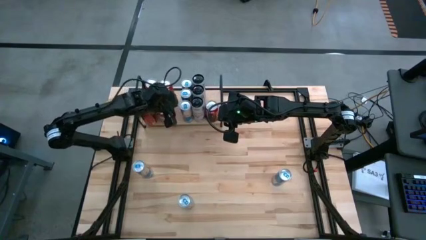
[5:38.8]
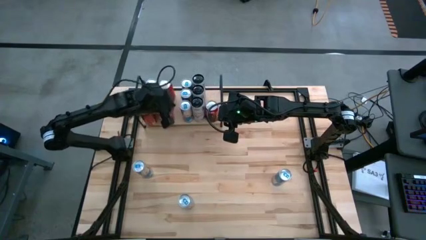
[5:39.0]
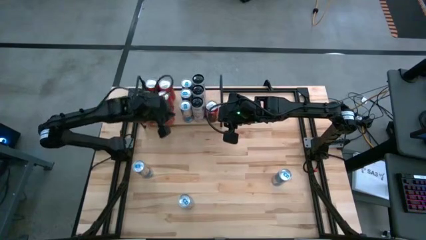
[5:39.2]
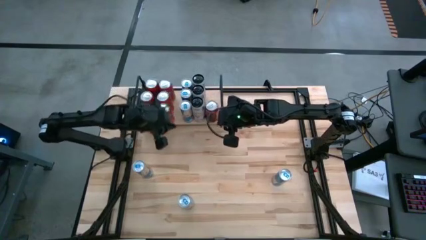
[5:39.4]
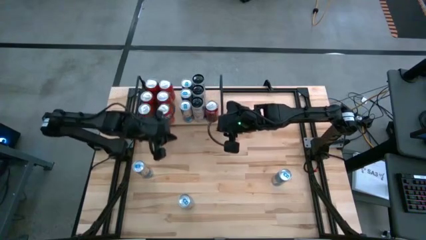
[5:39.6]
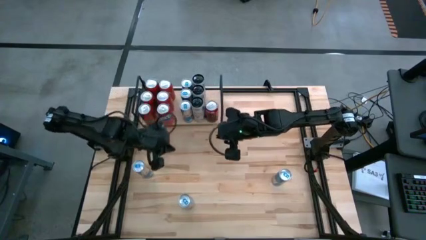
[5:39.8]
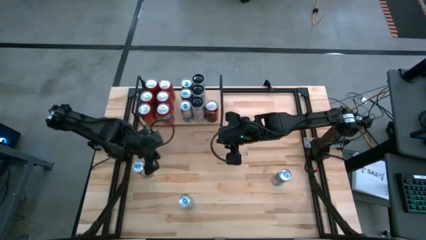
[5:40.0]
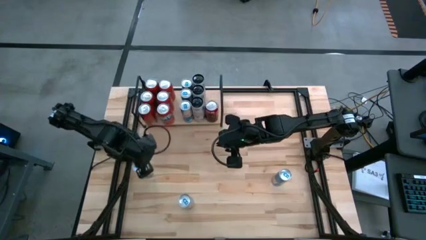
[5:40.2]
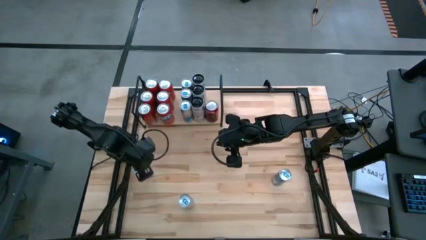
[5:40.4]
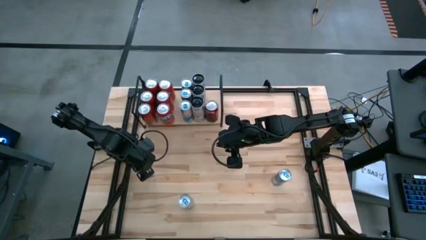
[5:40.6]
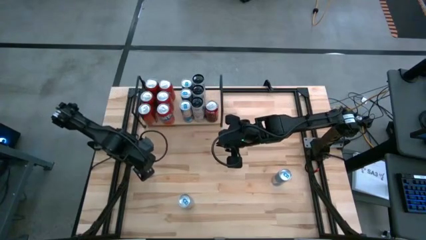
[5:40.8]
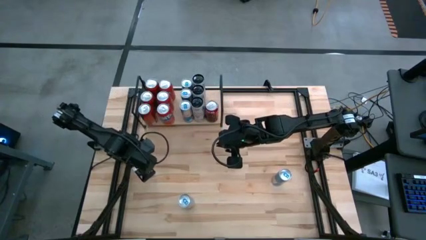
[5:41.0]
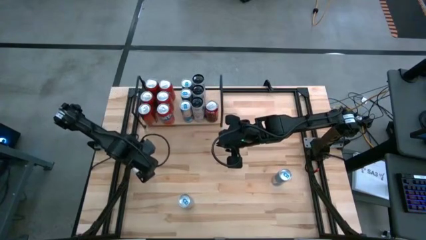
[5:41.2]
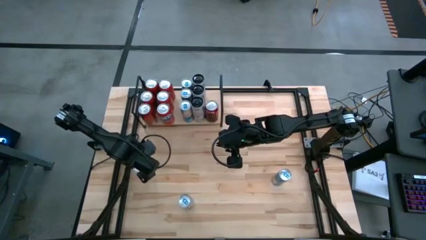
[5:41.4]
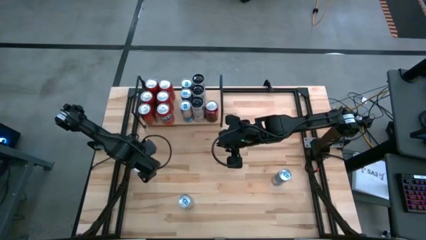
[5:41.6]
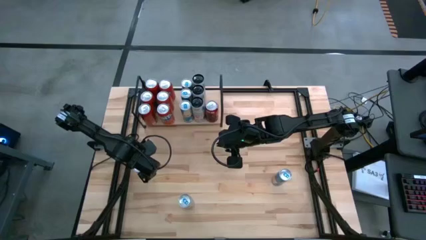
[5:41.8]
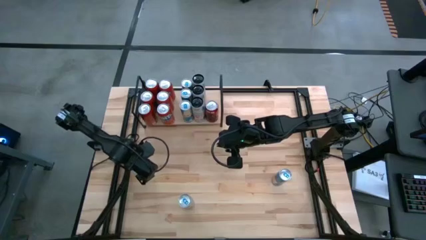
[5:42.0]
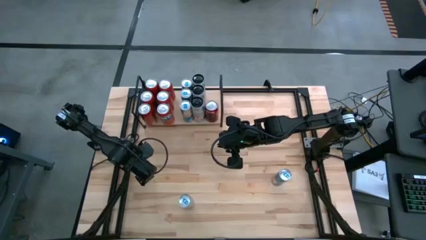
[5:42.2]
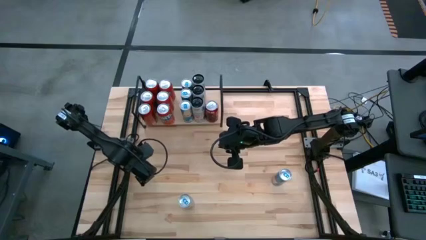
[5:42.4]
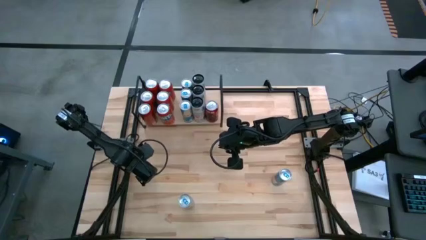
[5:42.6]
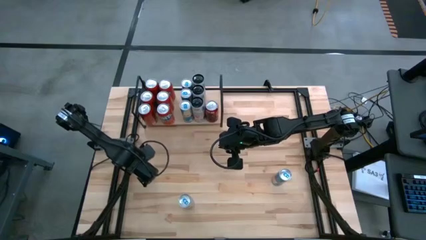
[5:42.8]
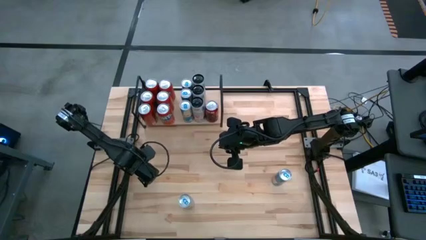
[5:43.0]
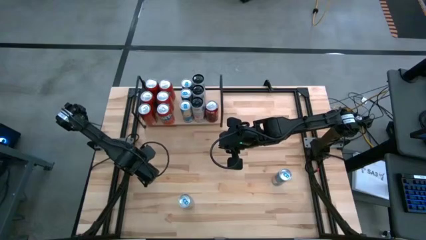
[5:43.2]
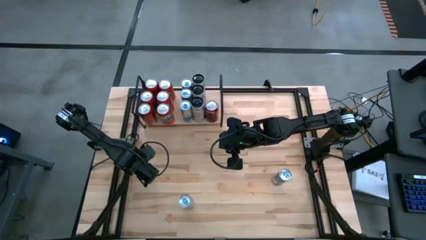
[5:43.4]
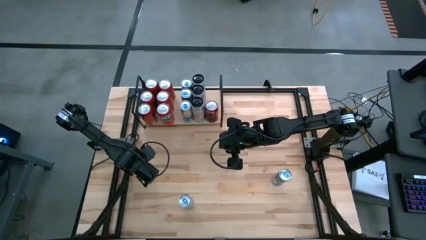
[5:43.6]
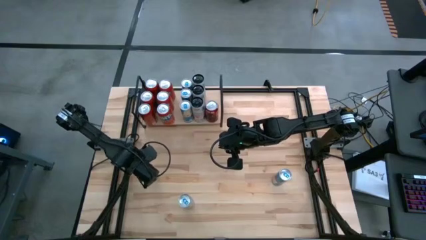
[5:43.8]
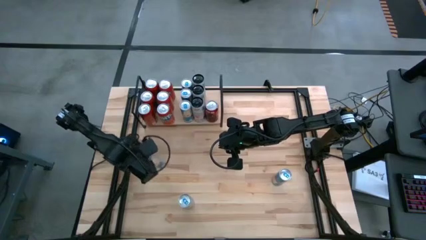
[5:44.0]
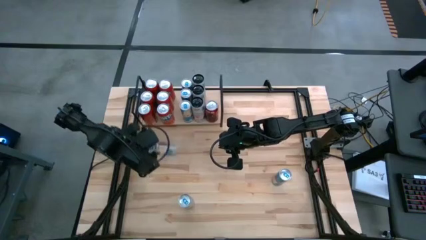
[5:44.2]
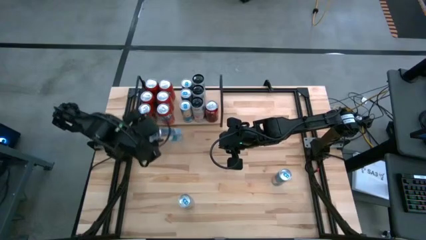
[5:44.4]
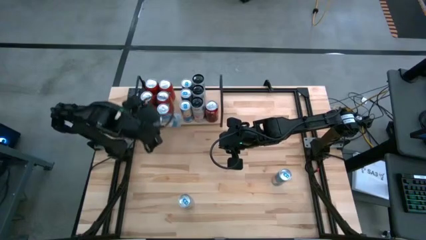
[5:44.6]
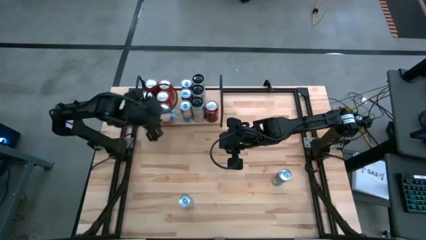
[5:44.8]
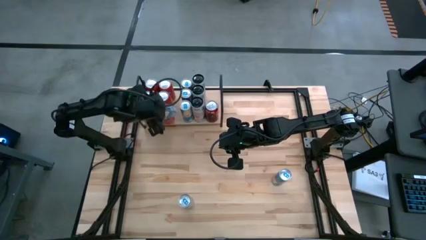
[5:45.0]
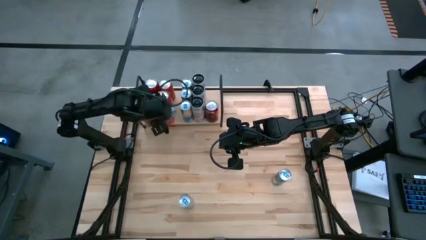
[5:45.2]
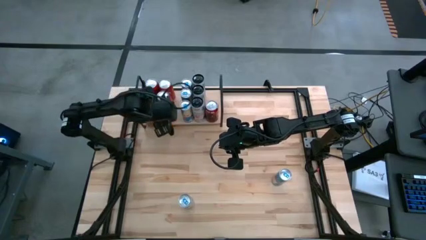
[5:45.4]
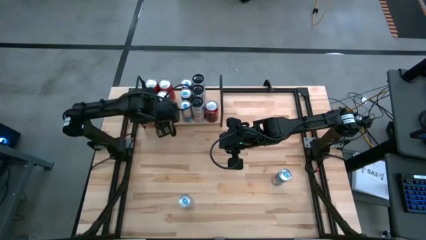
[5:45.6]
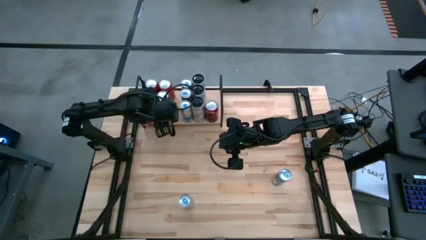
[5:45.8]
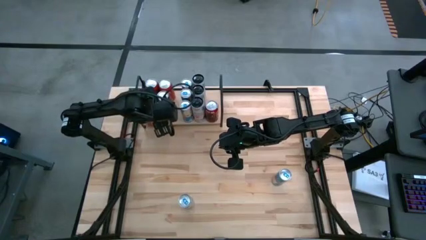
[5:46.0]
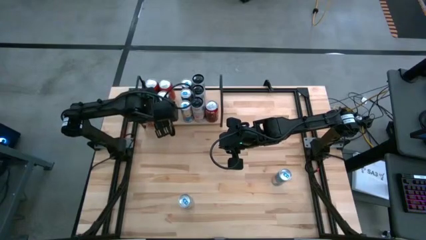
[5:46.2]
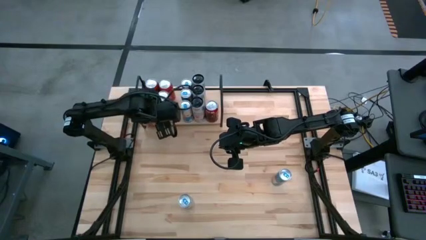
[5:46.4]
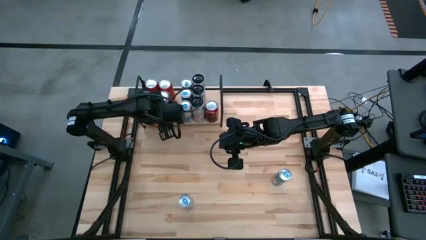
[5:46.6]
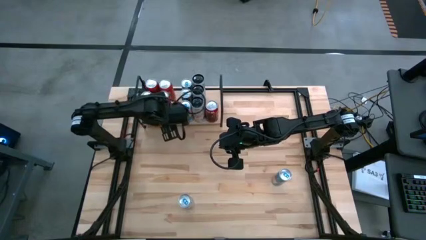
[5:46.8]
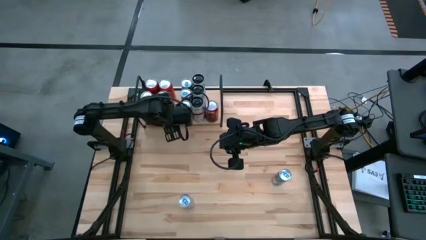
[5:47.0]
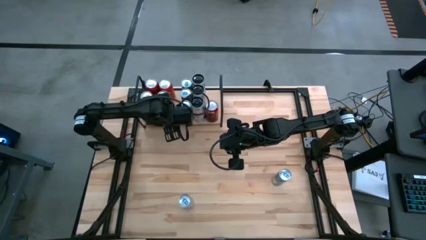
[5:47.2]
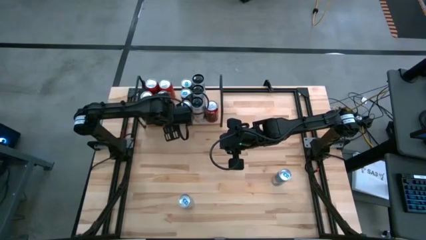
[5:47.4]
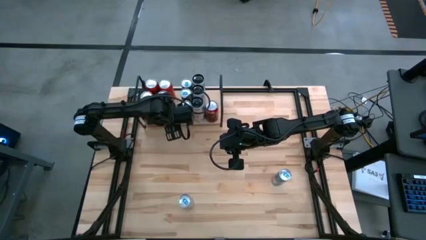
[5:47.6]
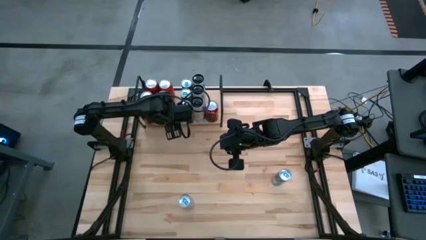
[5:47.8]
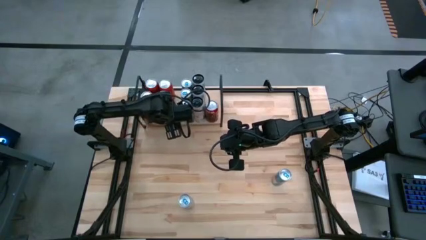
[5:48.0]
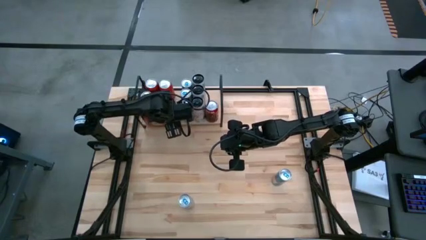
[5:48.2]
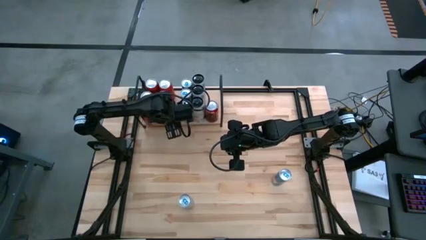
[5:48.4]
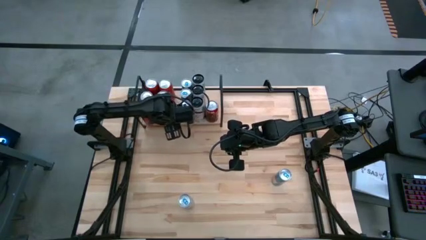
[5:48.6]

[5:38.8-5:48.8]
Task: Place canned beverage on shelf
Put the blue soda can on the shelf beside the other aligned blue soda cans
